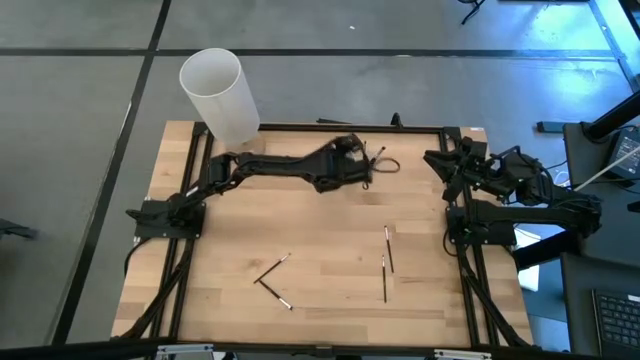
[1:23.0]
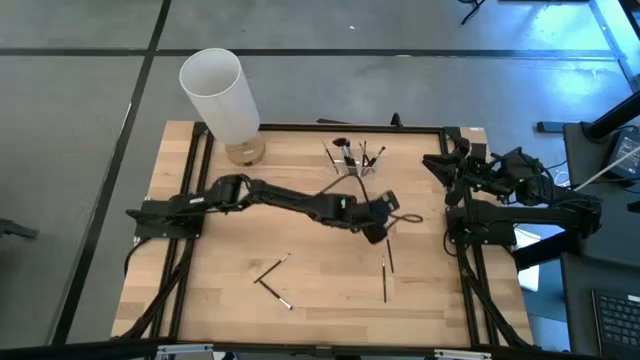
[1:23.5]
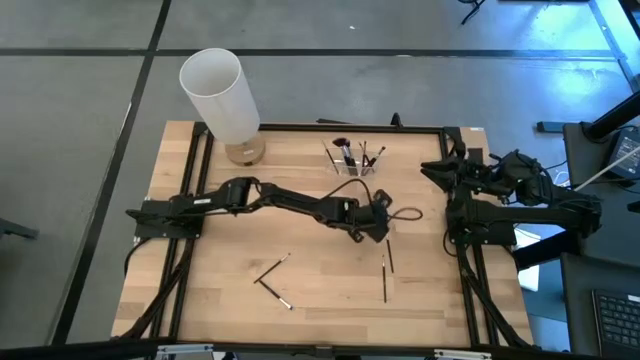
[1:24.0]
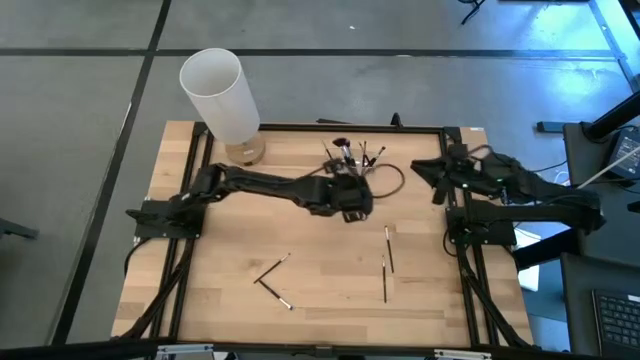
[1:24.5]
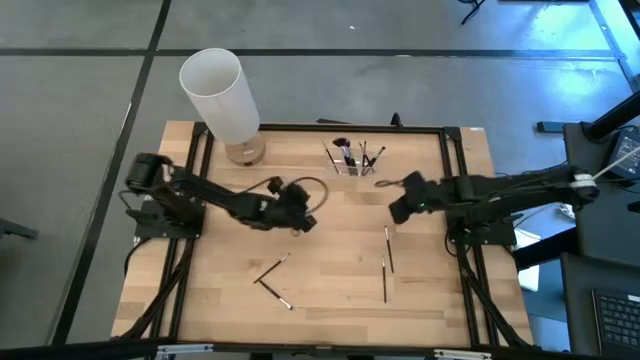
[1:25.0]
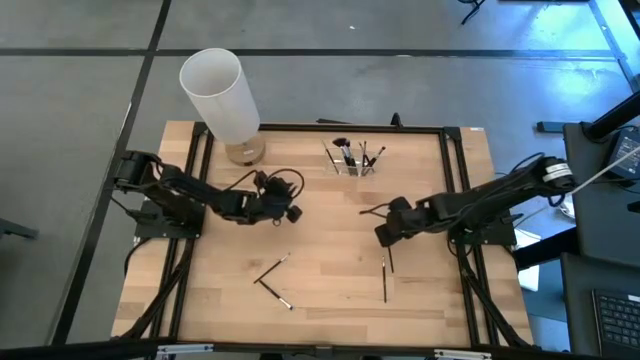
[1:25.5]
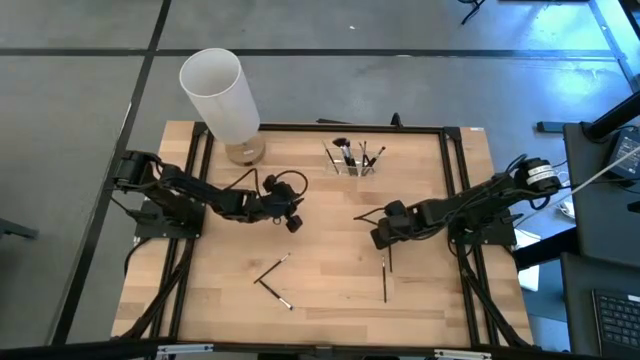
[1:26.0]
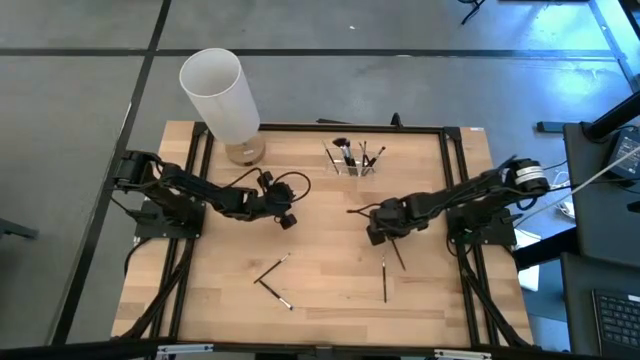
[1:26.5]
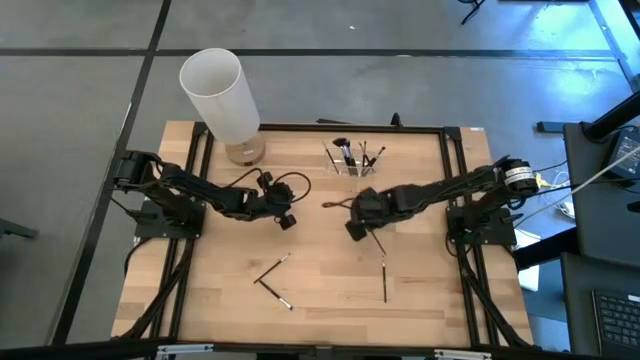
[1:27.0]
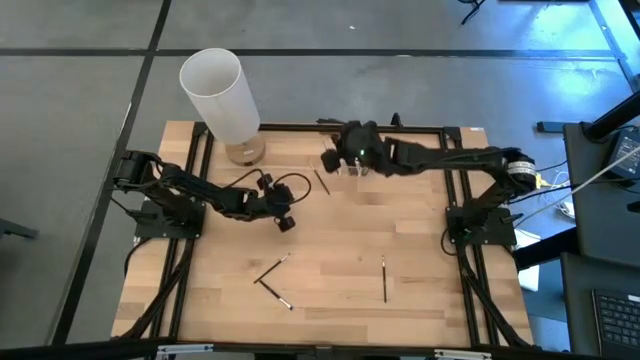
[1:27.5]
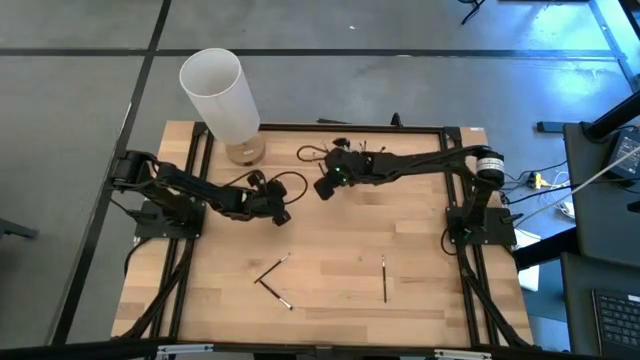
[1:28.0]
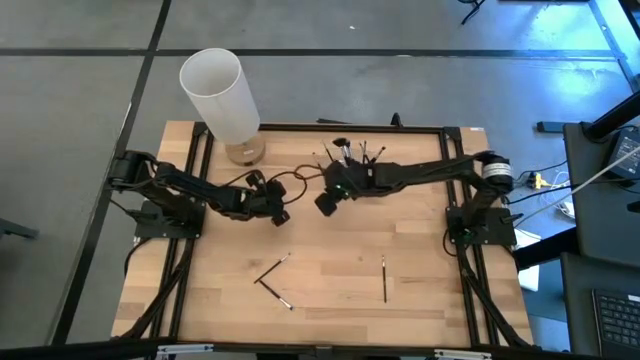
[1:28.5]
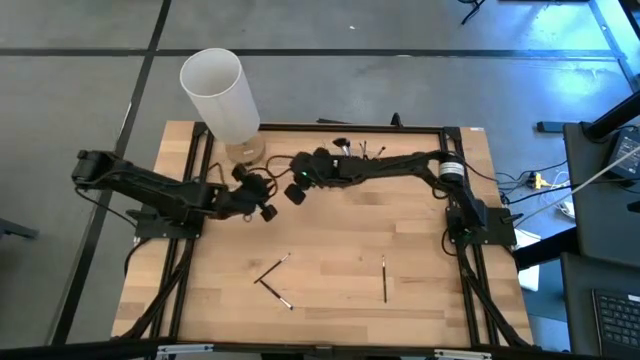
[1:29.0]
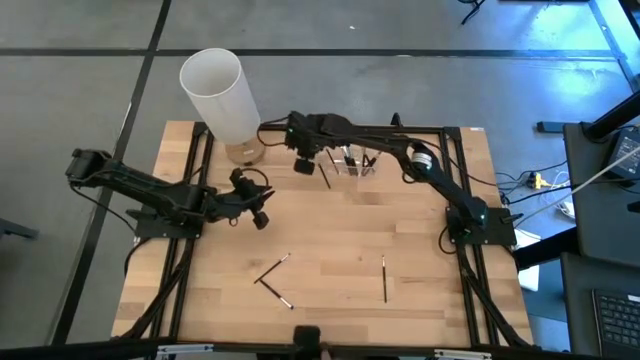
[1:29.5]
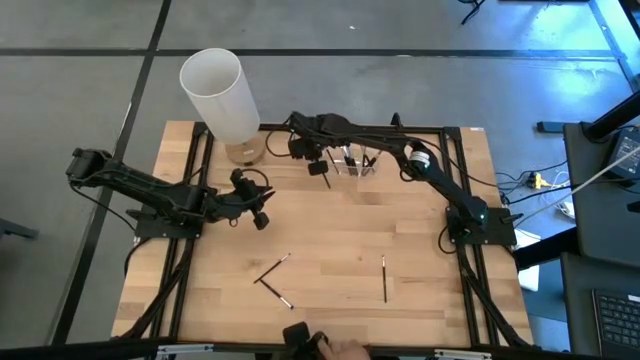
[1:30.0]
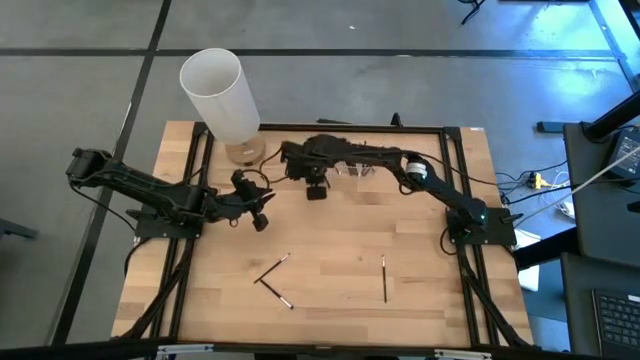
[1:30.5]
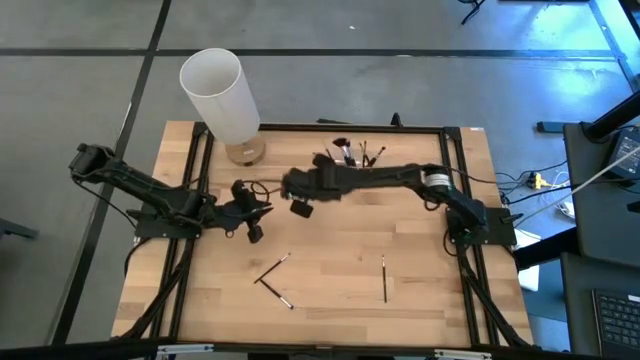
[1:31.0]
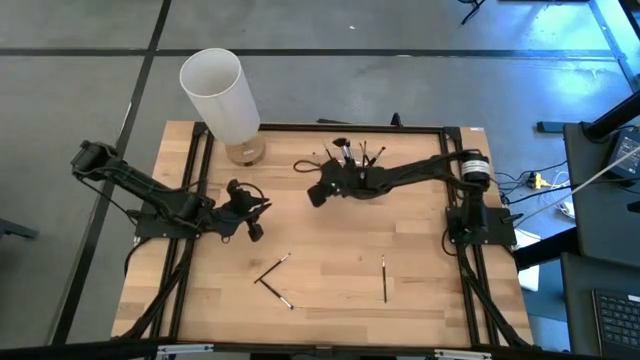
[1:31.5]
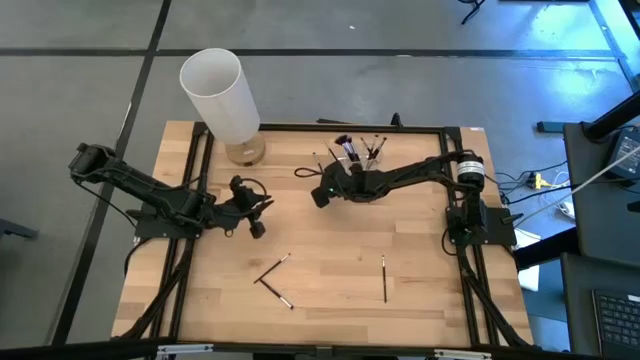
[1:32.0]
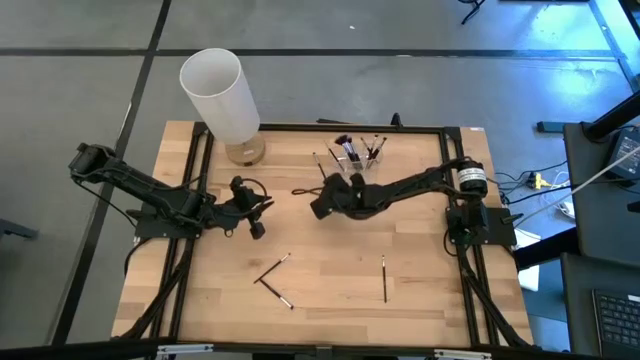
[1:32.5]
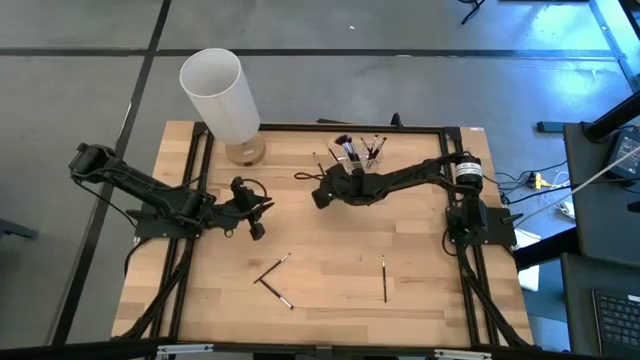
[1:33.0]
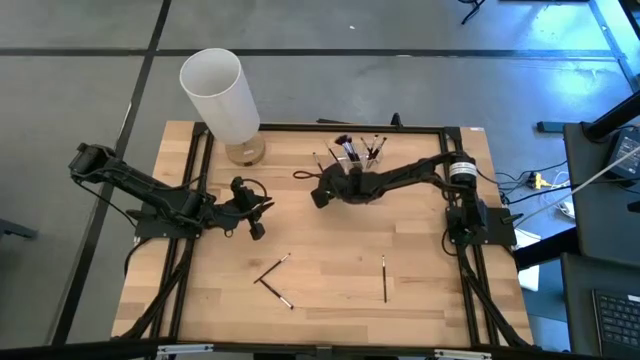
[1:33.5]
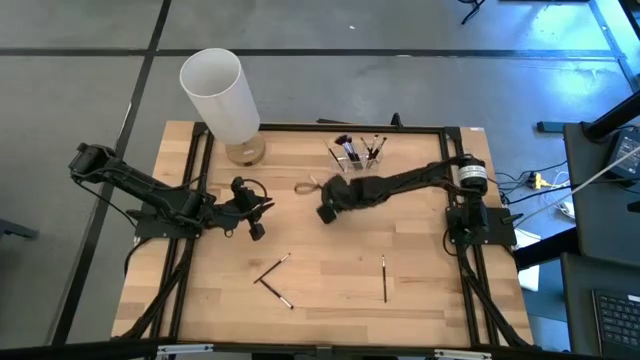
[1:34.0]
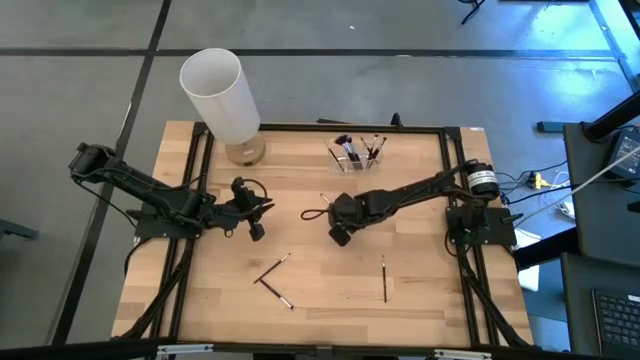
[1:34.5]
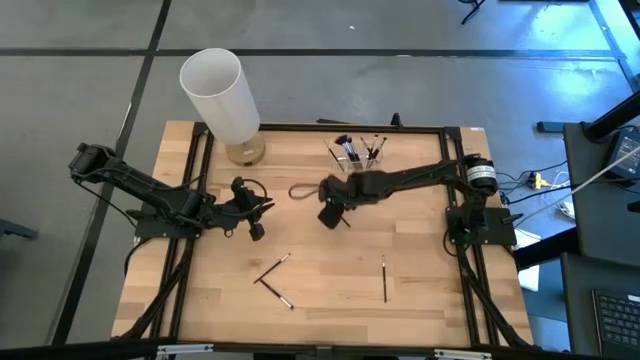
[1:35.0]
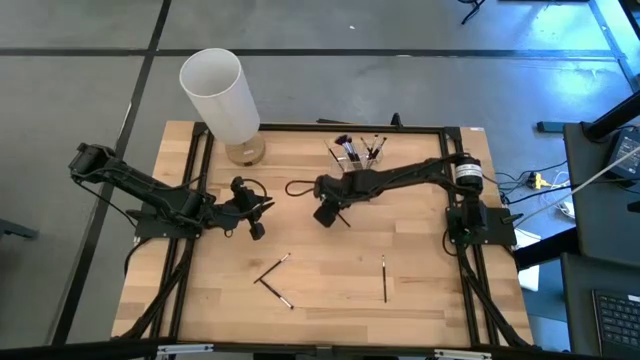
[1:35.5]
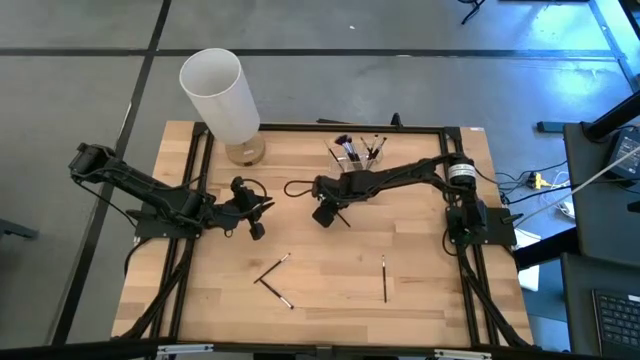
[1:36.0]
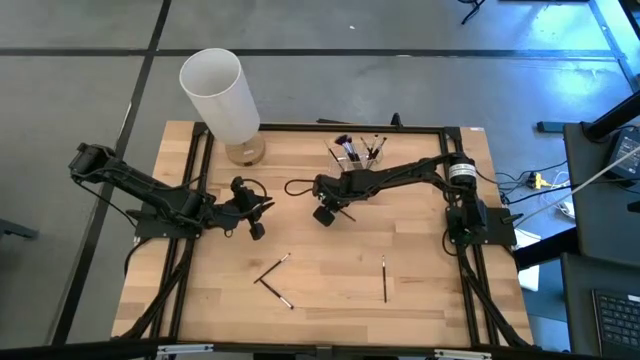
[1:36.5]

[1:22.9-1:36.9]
Task: Put items in baskets/containers
Put the black eyeshadow brush into the transparent organizer

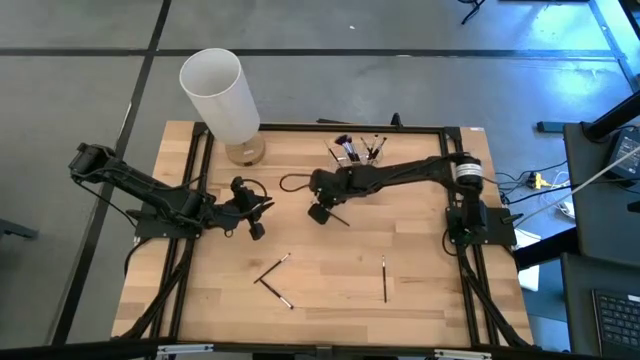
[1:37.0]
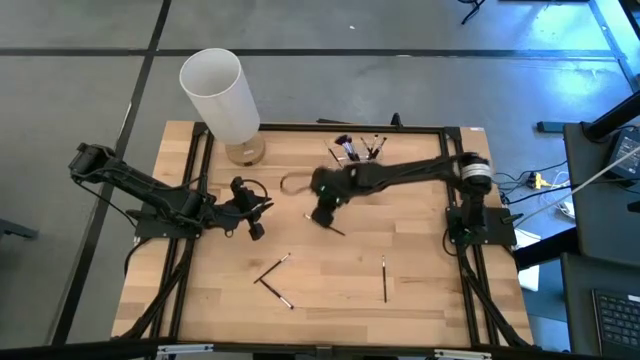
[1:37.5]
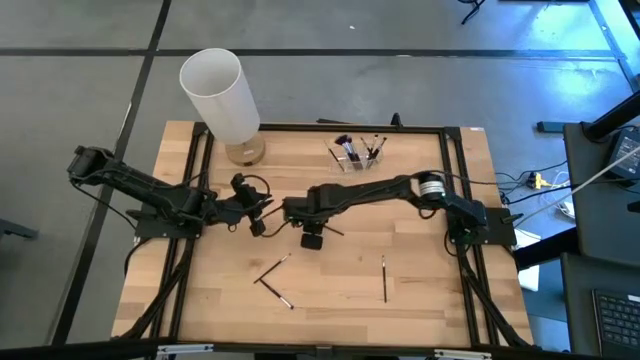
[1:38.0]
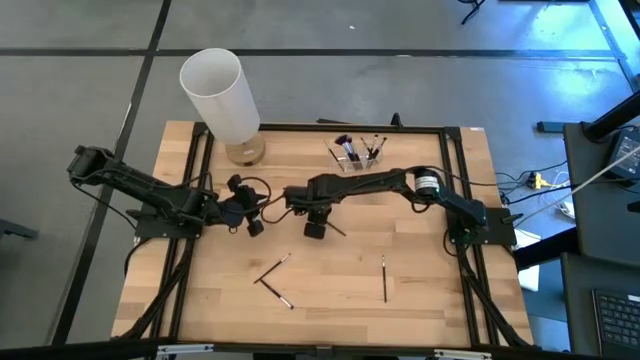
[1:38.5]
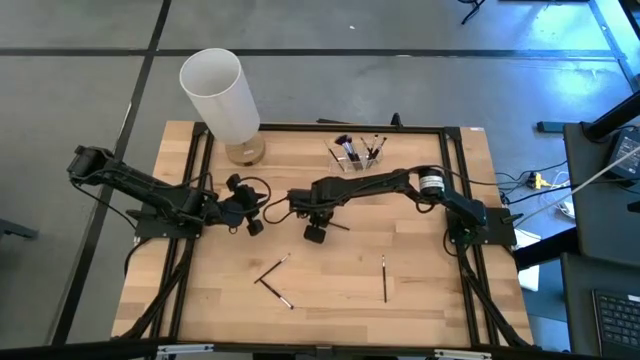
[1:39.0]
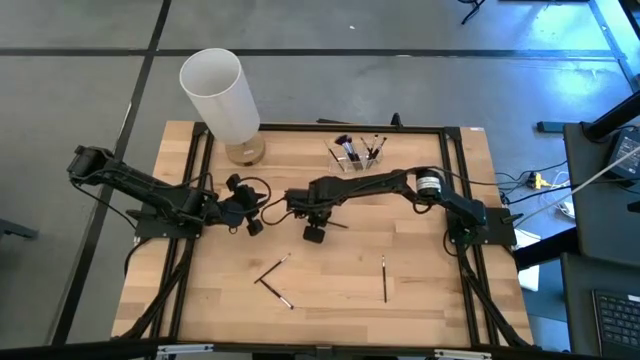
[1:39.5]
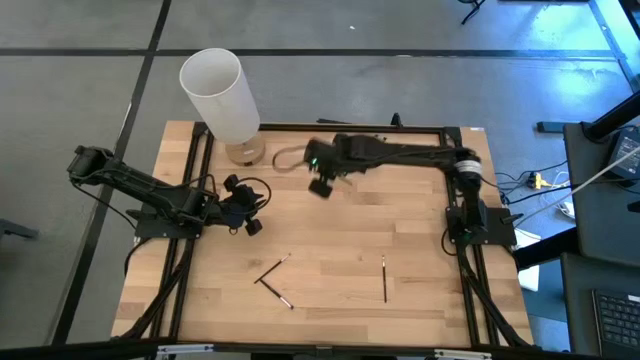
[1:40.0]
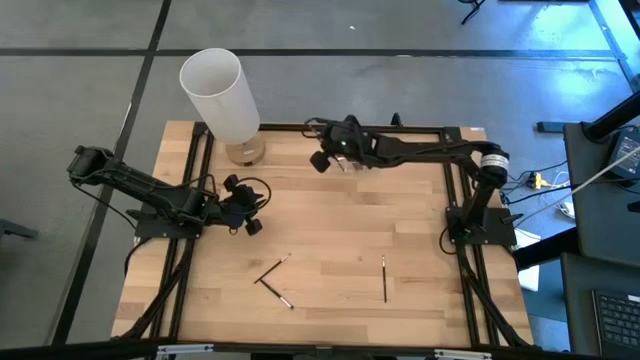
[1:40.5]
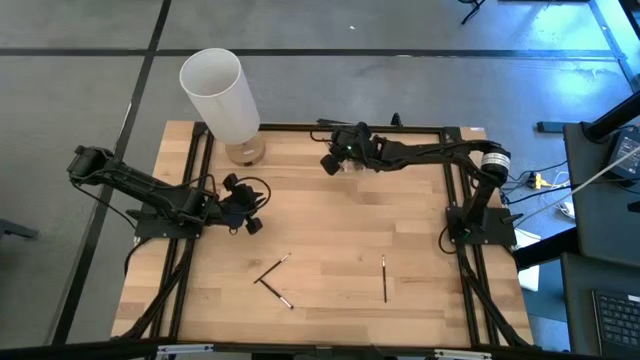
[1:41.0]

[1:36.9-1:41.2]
Put the black eyeshadow brush into the transparent organizer

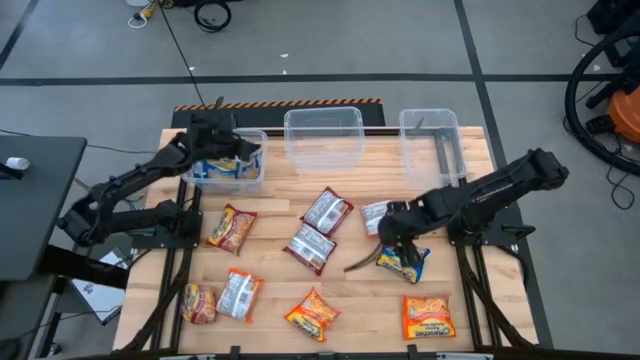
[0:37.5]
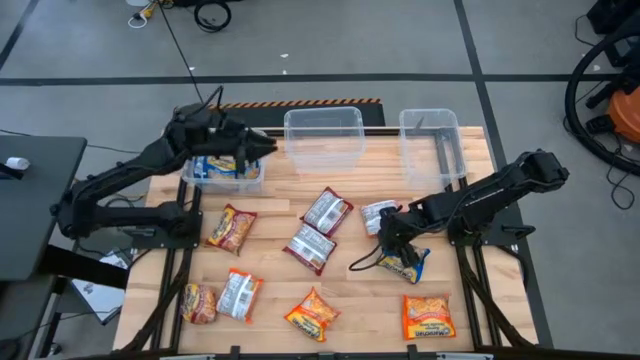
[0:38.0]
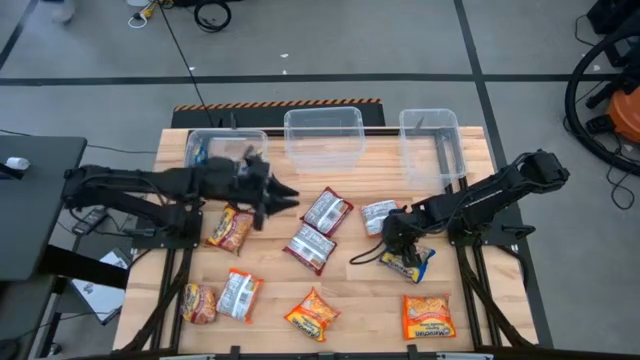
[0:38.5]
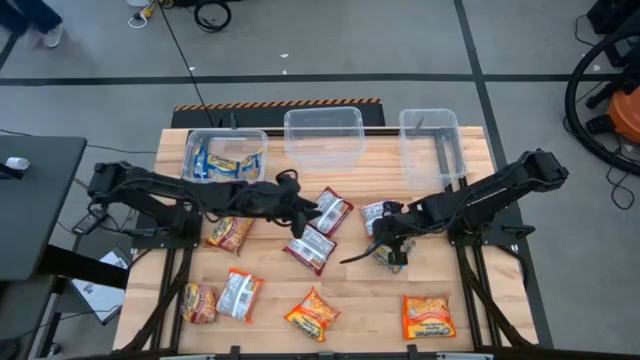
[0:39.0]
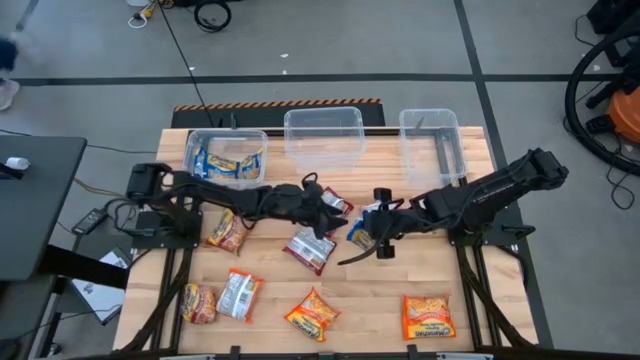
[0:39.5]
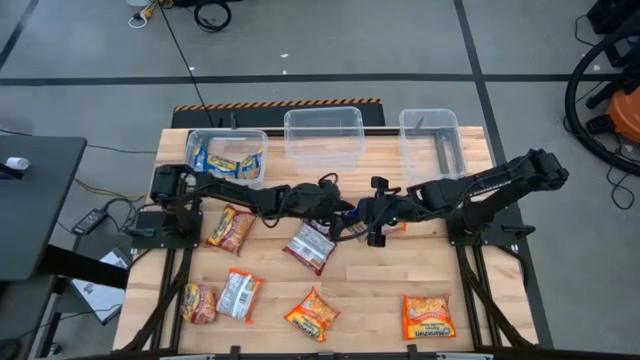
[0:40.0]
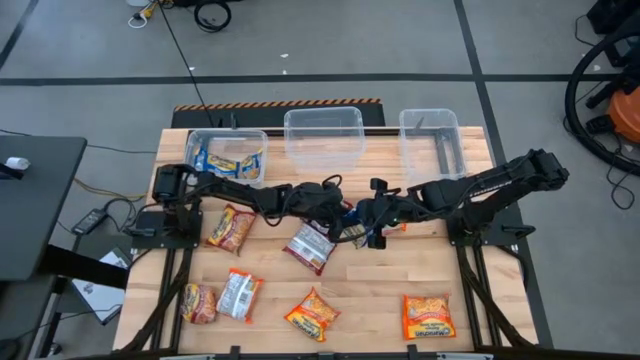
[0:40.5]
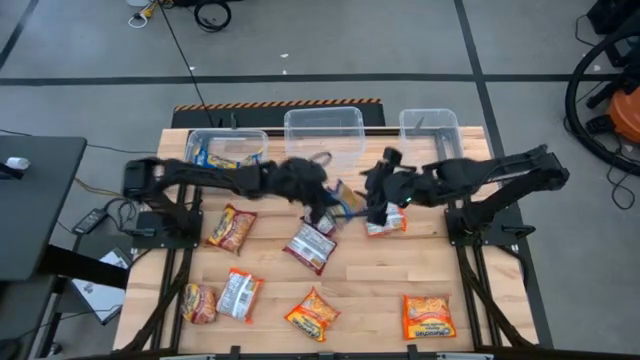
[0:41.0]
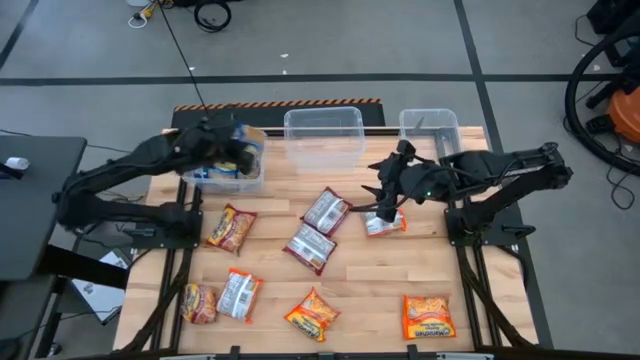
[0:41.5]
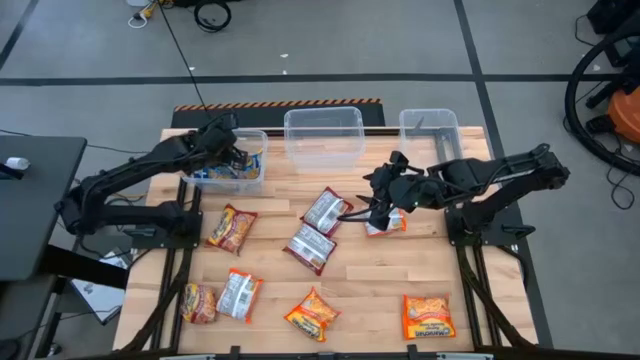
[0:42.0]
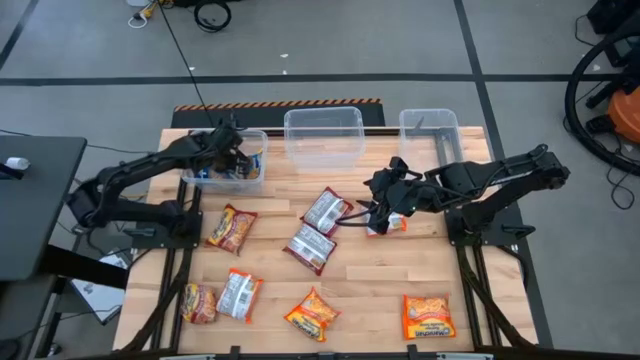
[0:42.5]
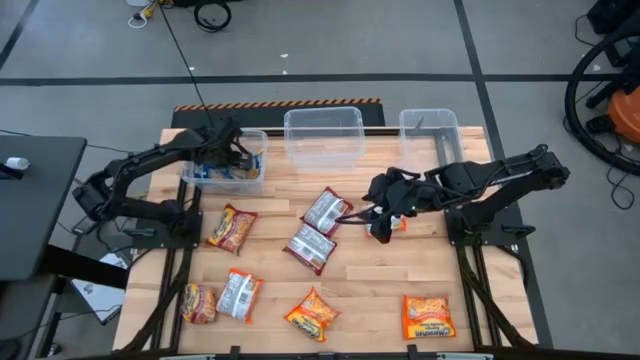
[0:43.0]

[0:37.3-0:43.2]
Task: Sort Maruchan noodles
Put the blue noodle pack into the left transparent bin
